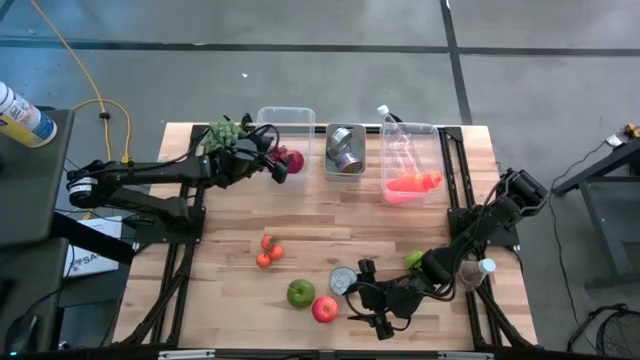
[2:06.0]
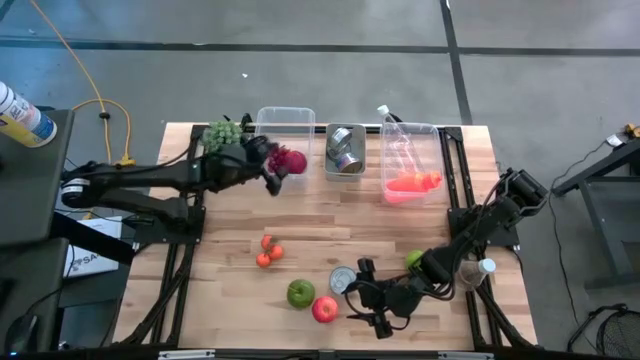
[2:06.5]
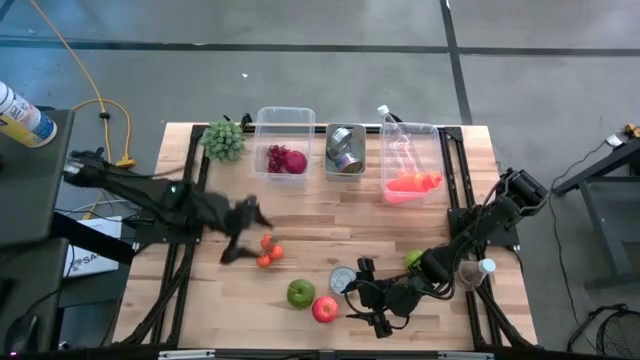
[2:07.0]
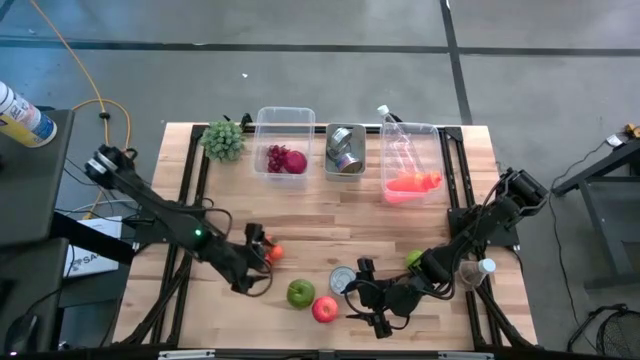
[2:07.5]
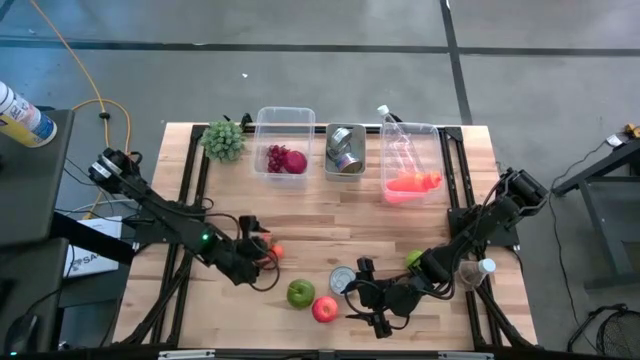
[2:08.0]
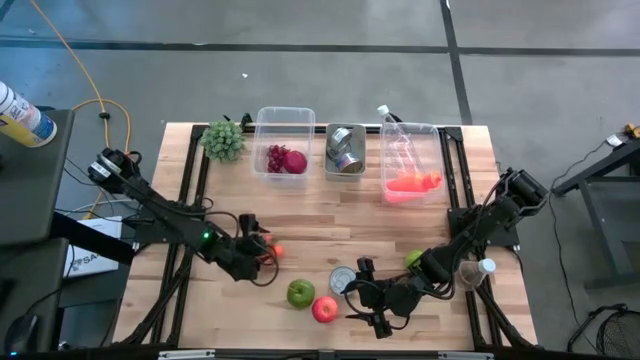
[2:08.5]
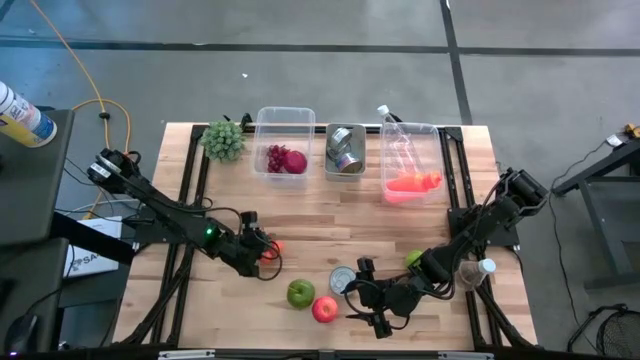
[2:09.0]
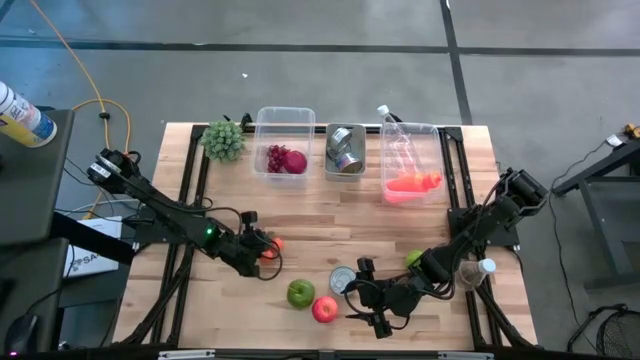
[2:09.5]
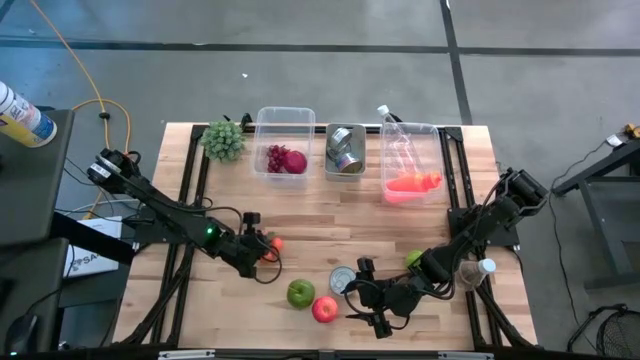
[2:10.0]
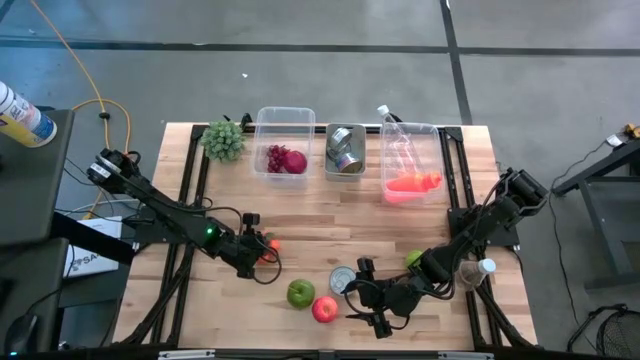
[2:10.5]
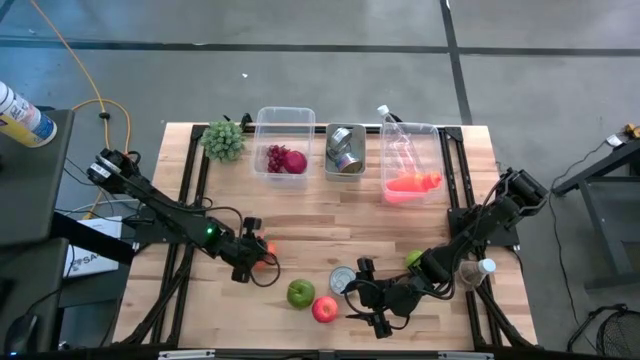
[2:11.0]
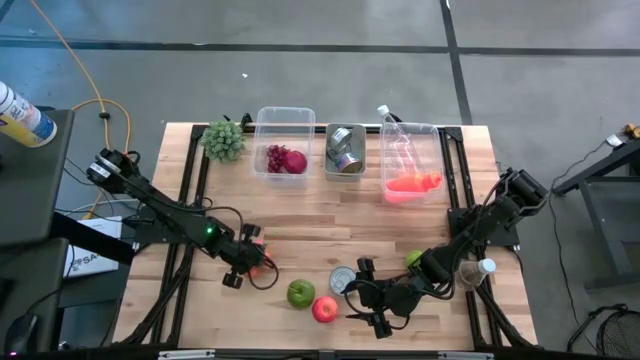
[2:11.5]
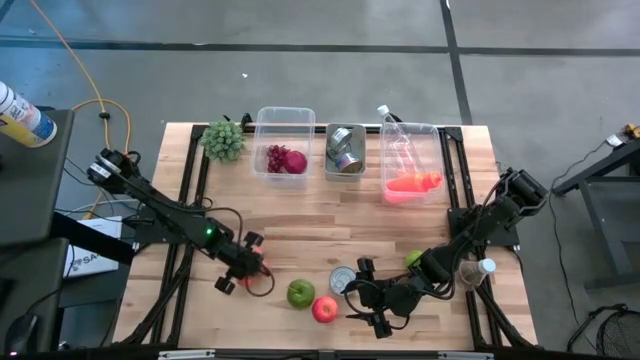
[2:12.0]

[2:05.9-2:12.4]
Task: Pick & Place Food Item
Put the orange tangerine into the left transparent bin

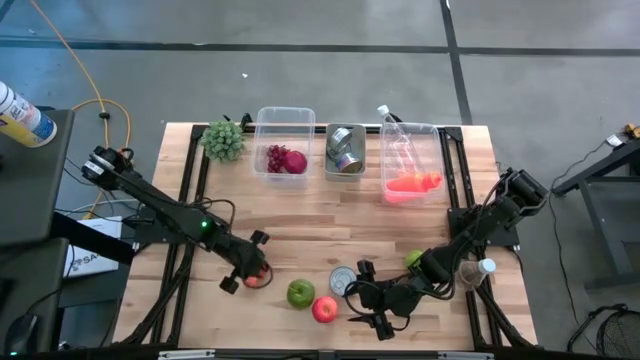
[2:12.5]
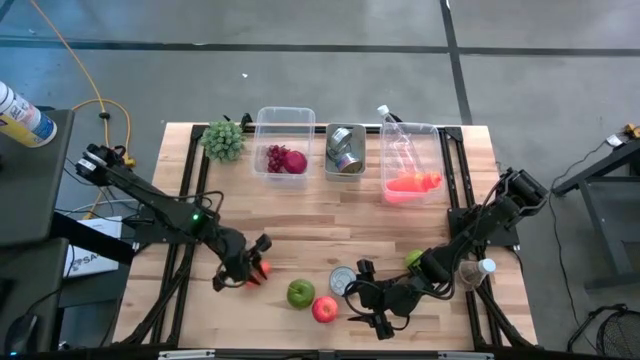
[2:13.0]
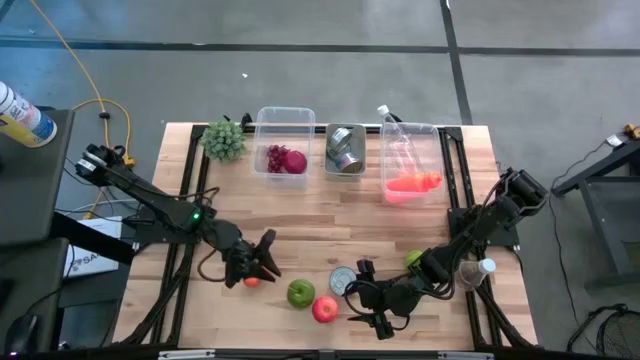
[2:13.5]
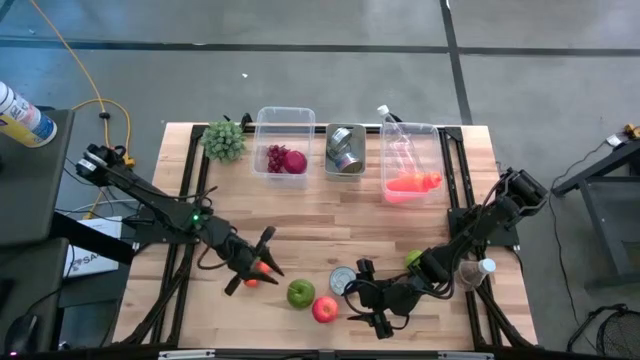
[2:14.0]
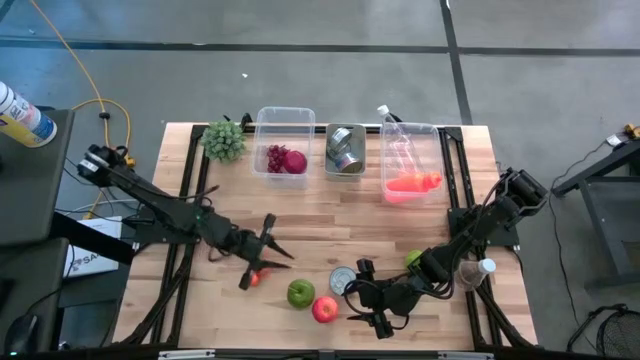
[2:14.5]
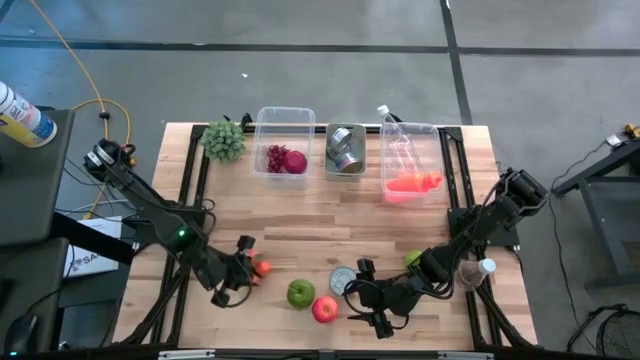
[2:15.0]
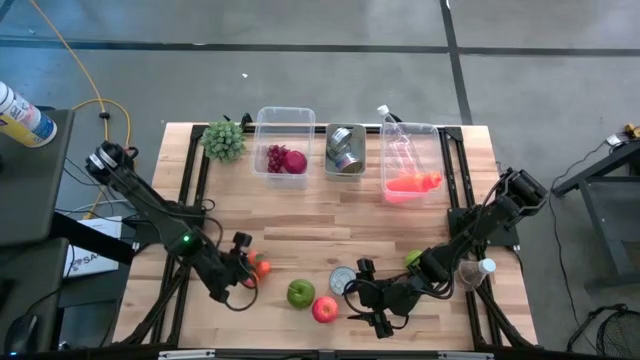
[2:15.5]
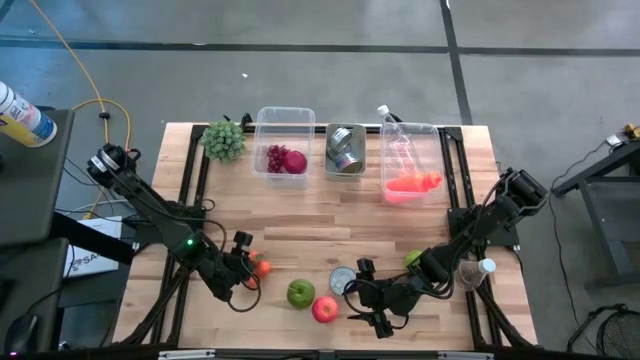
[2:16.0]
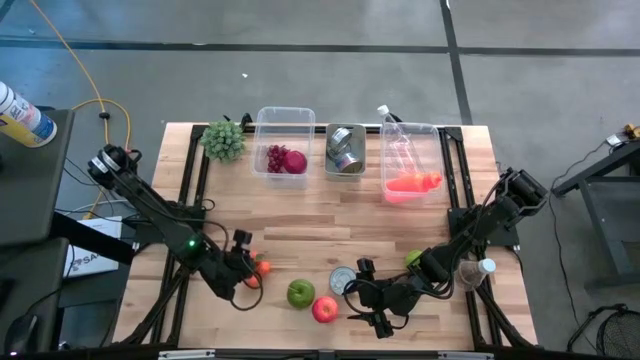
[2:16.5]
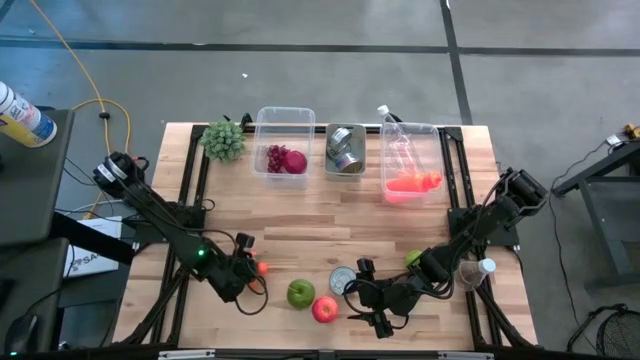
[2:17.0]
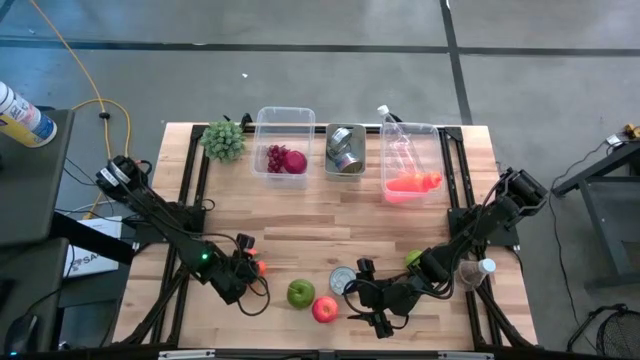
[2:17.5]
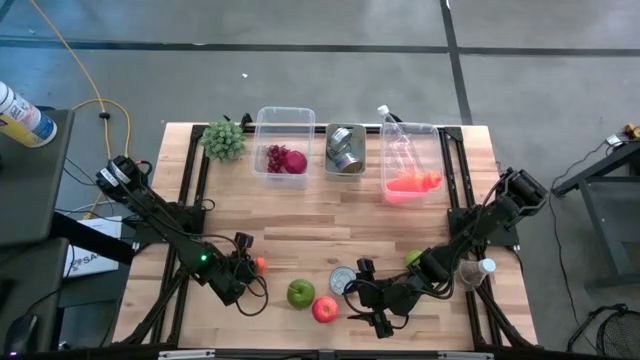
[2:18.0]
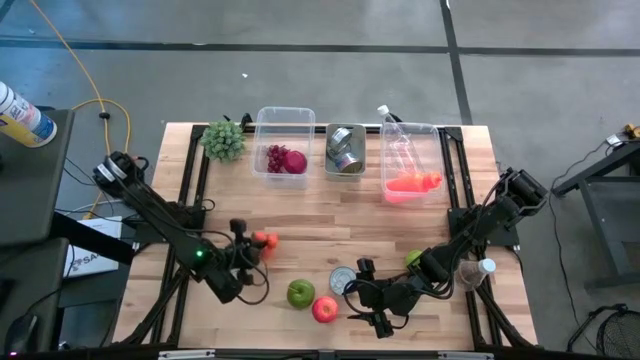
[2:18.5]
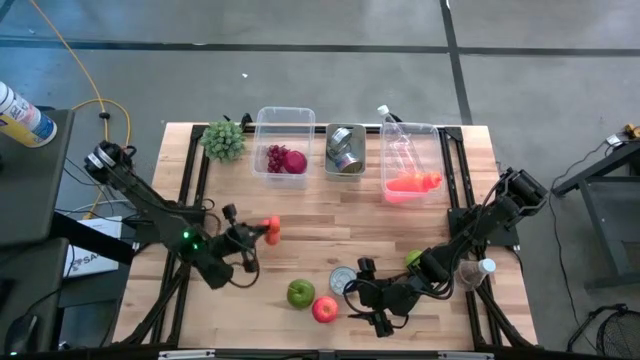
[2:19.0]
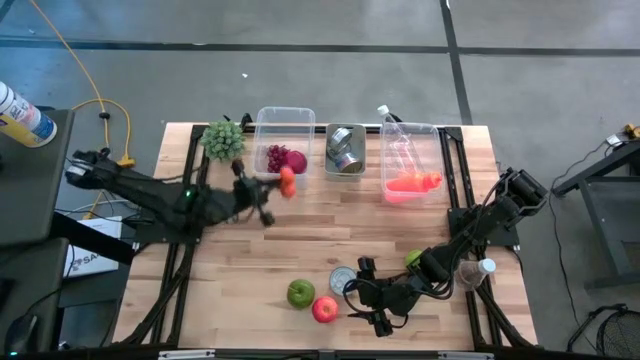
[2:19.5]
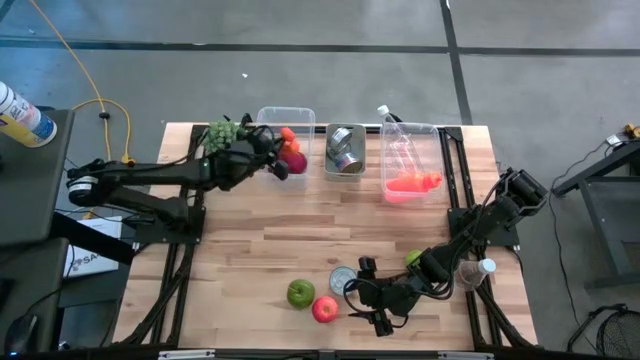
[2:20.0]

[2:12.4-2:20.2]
Put the orange tangerine into the left transparent bin
